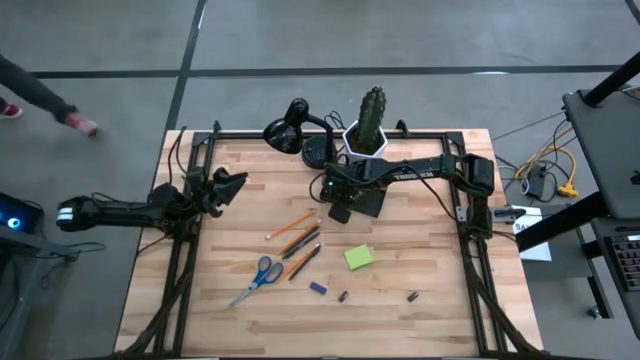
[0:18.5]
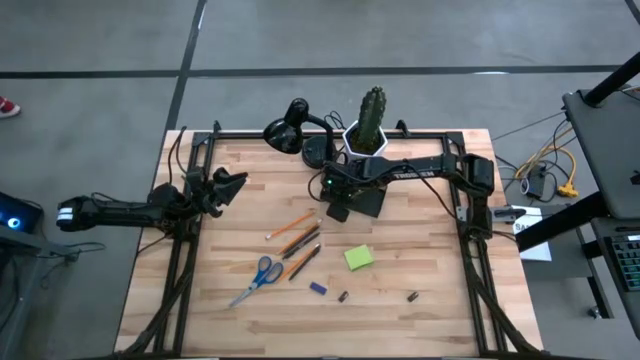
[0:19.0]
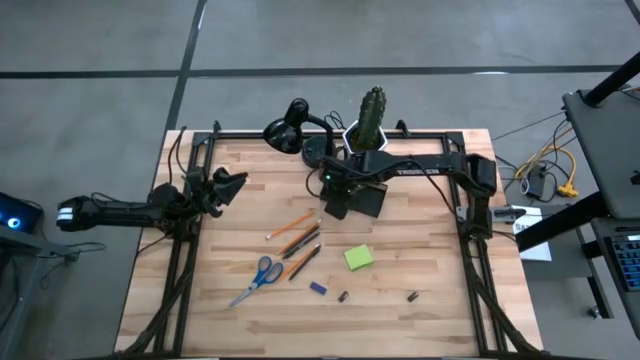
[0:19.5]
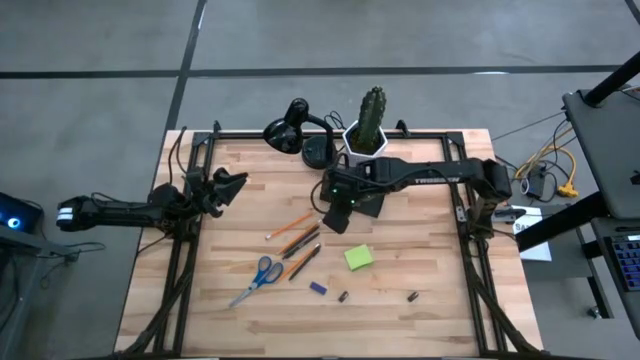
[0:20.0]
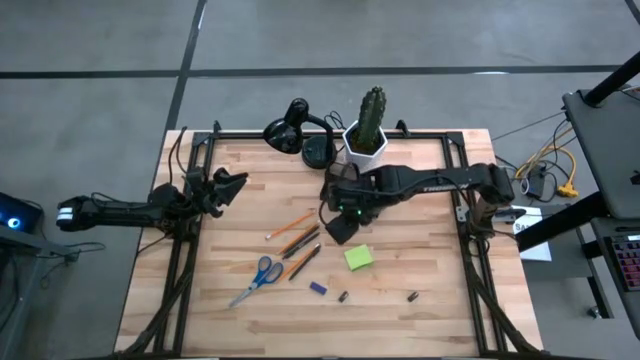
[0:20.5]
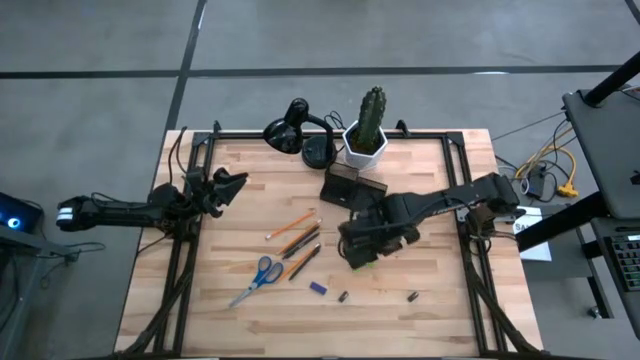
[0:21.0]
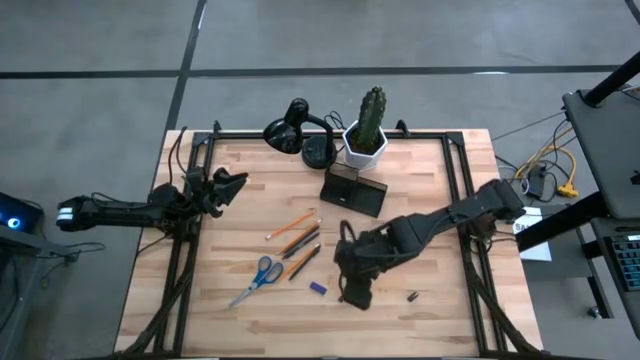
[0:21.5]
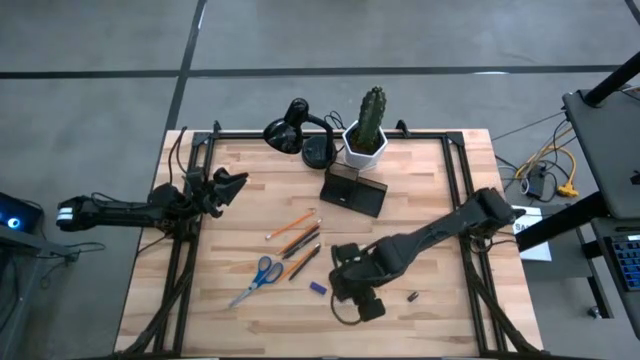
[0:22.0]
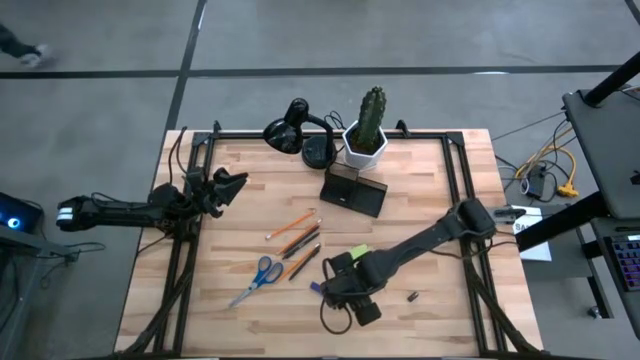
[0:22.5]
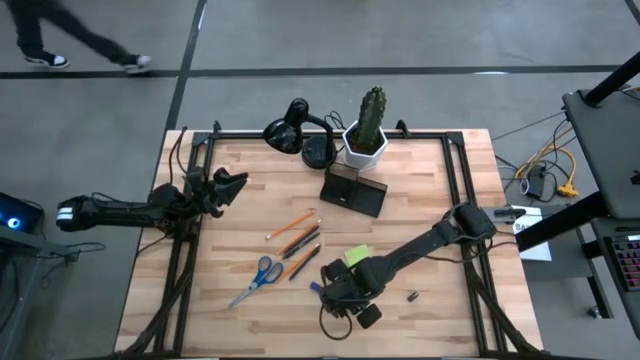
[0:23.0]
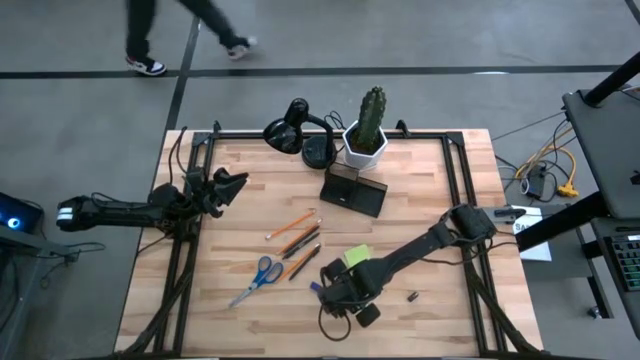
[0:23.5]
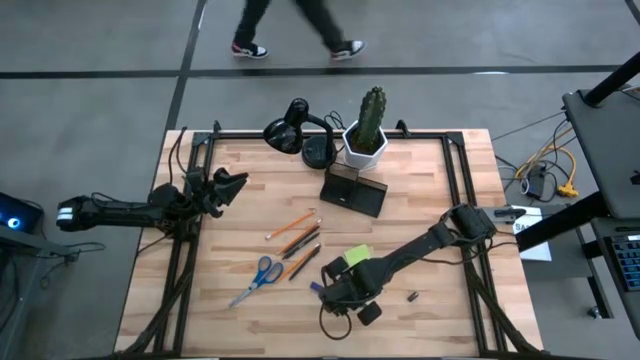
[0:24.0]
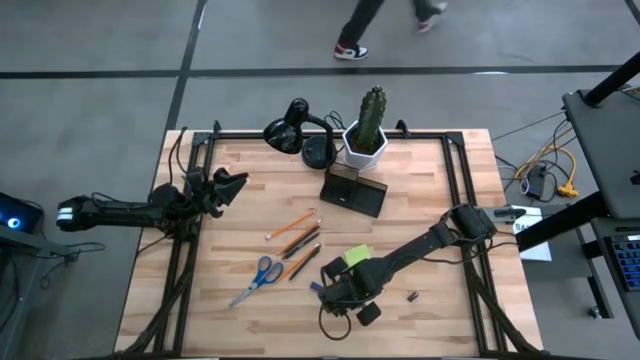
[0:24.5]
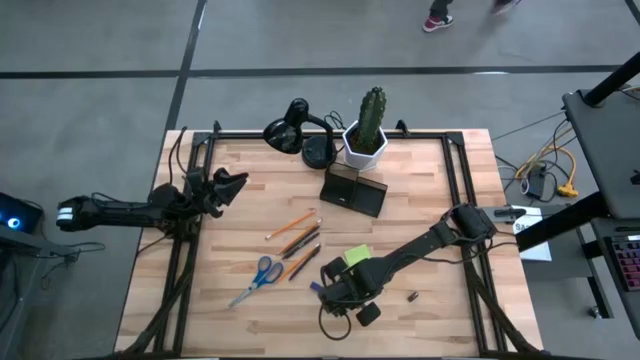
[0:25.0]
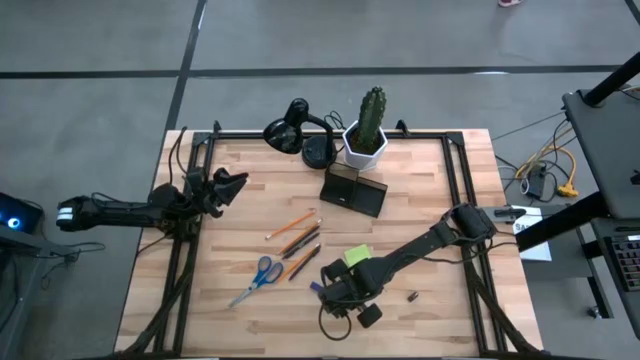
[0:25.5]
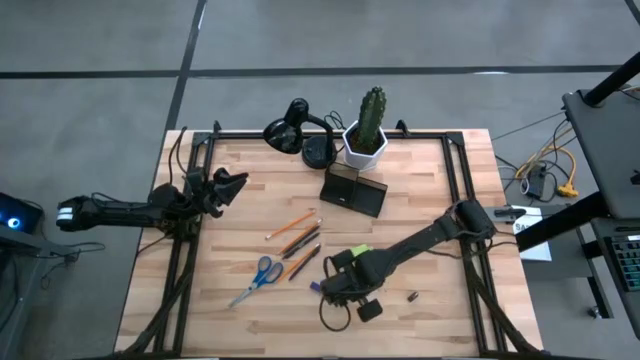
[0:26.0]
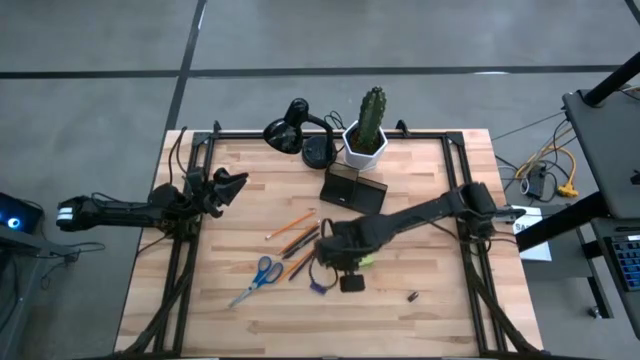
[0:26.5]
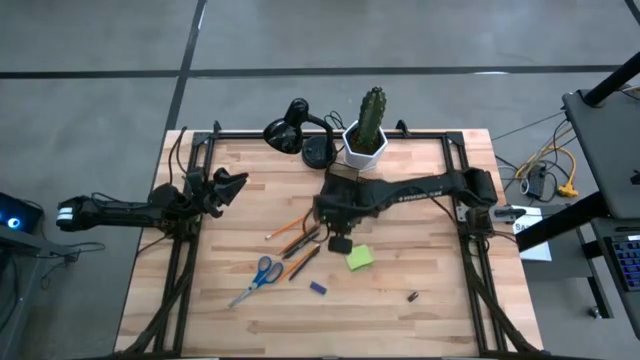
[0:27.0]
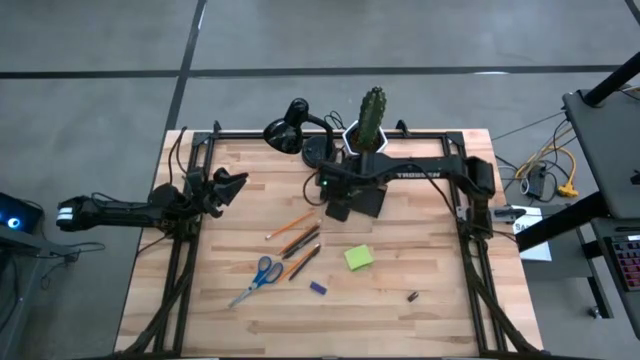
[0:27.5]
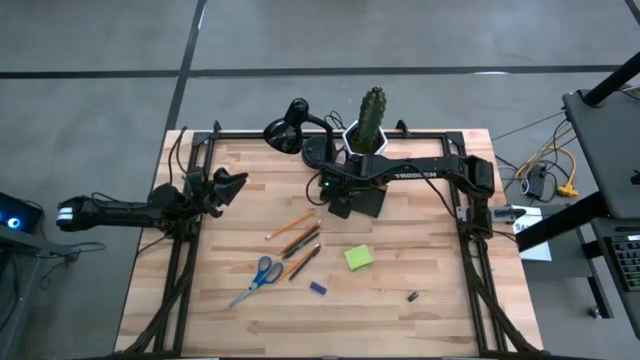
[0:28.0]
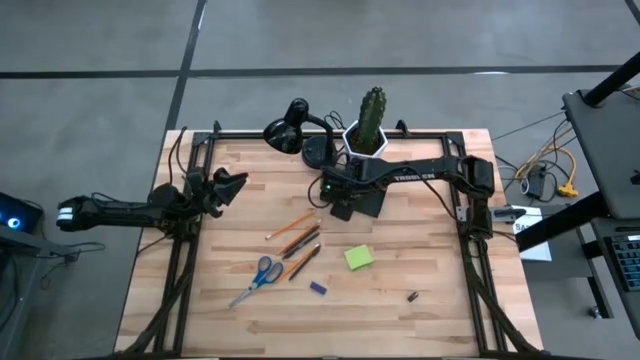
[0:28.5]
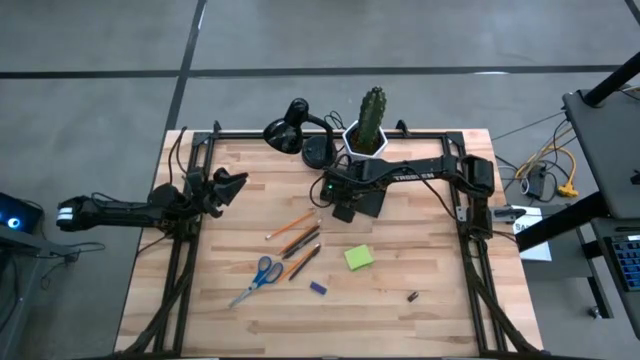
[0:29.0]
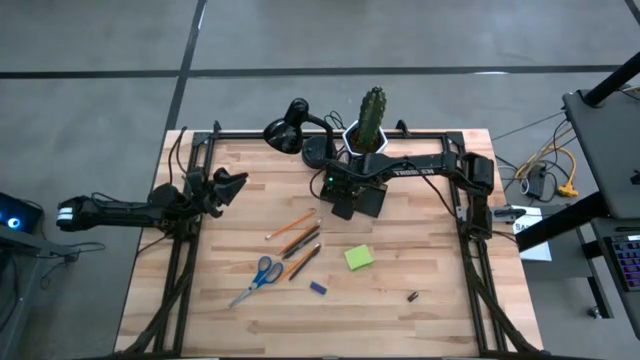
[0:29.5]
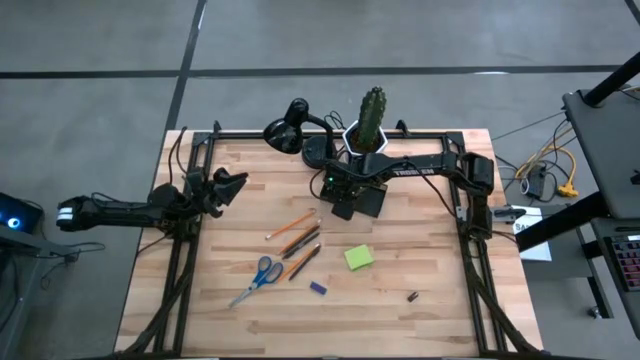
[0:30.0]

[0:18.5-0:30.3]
Task: Pick and place office supplies into organizer
Put the left black binder clip into the black desk organizer

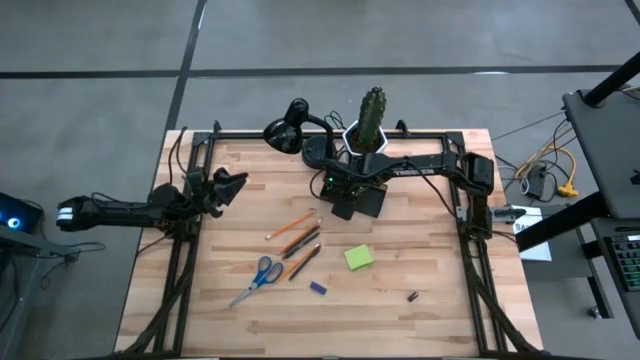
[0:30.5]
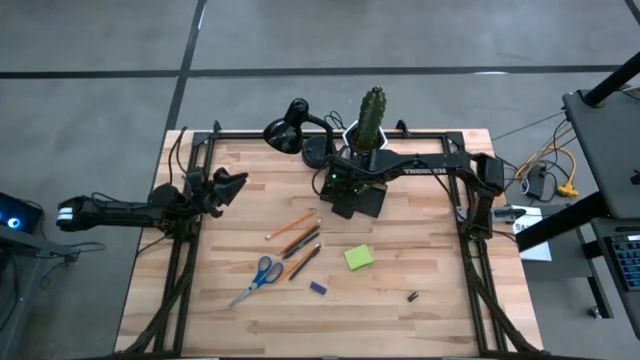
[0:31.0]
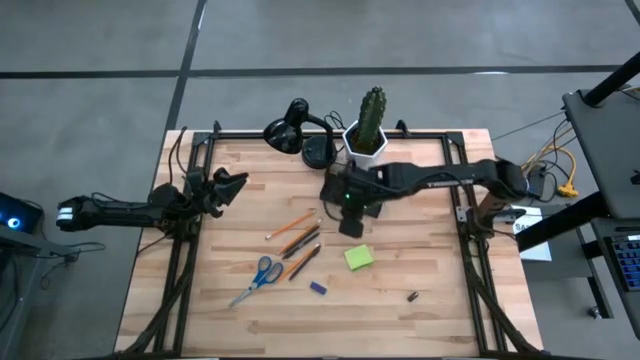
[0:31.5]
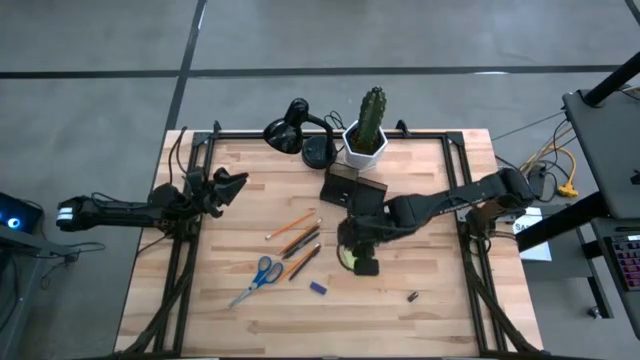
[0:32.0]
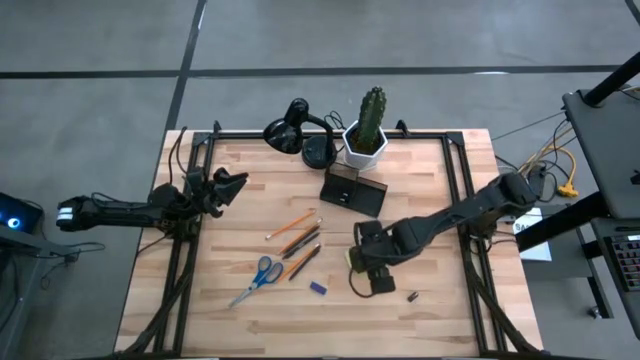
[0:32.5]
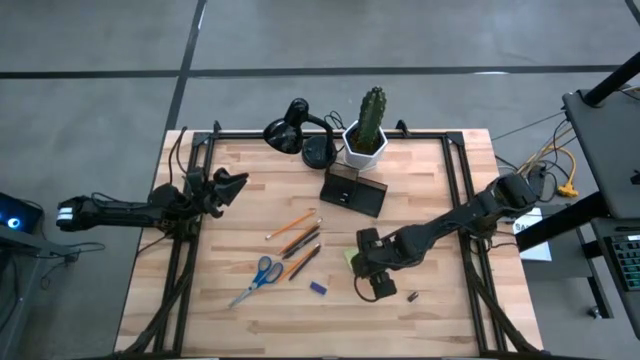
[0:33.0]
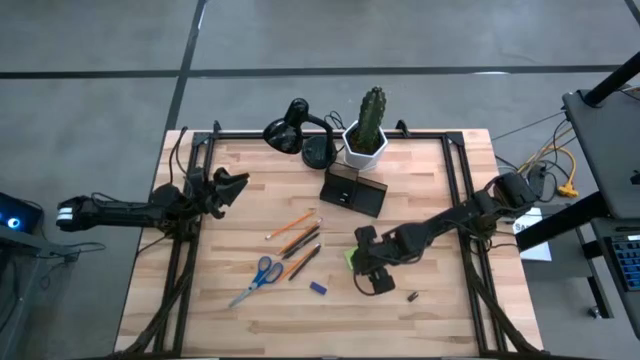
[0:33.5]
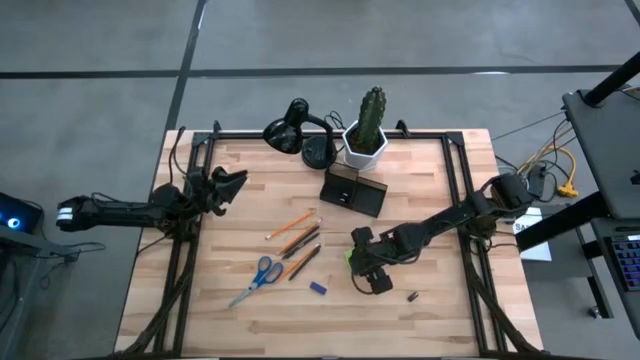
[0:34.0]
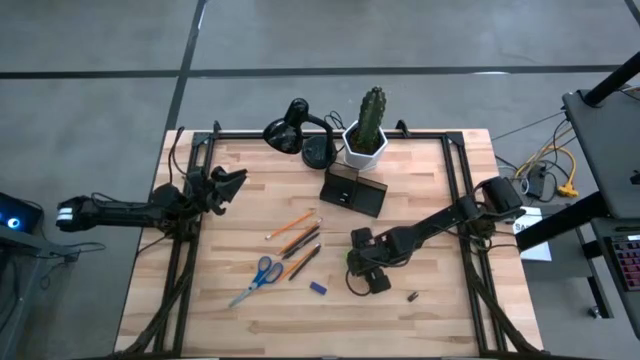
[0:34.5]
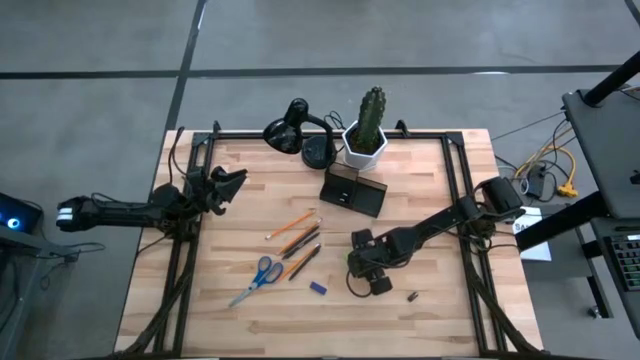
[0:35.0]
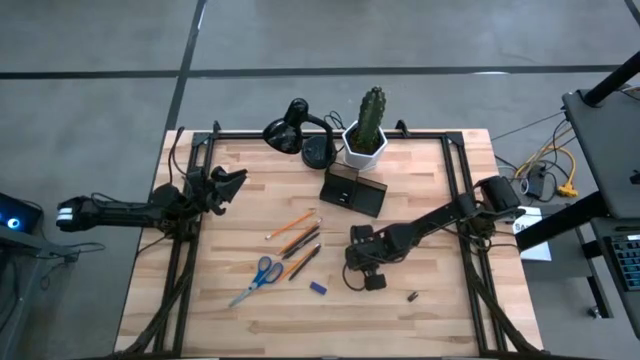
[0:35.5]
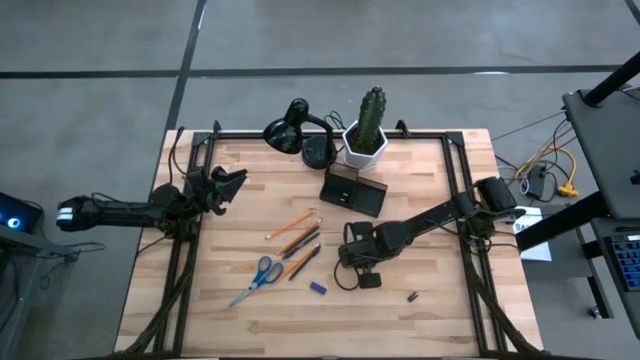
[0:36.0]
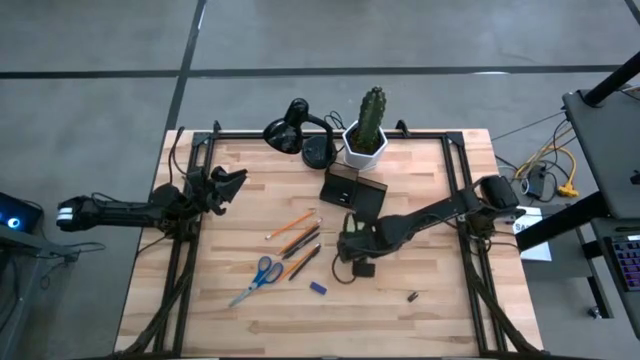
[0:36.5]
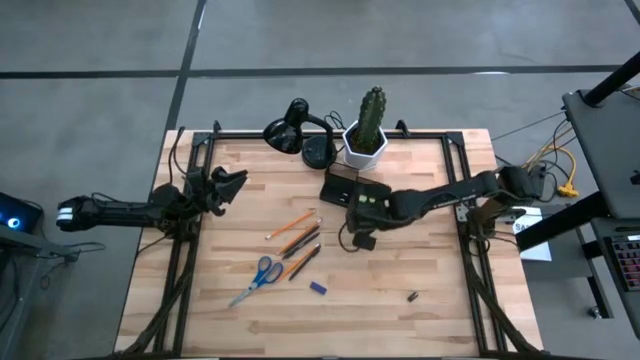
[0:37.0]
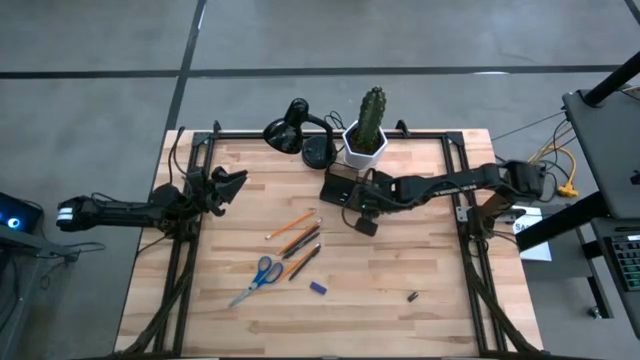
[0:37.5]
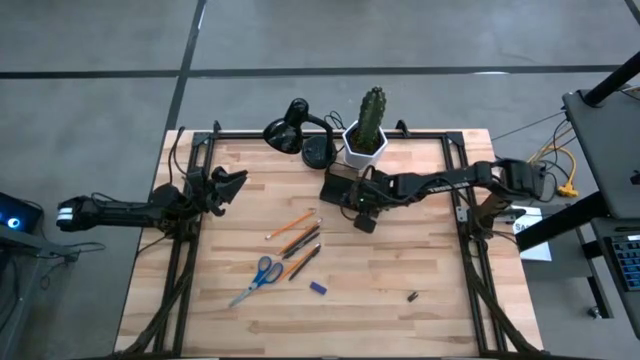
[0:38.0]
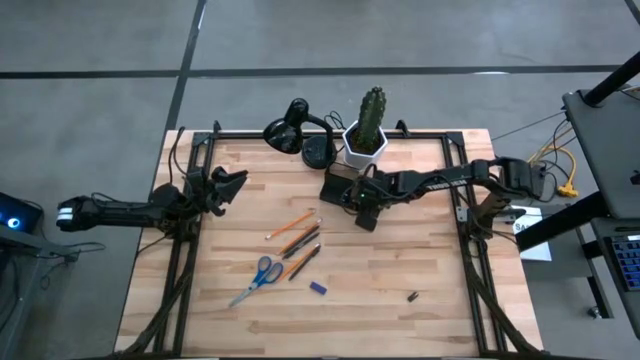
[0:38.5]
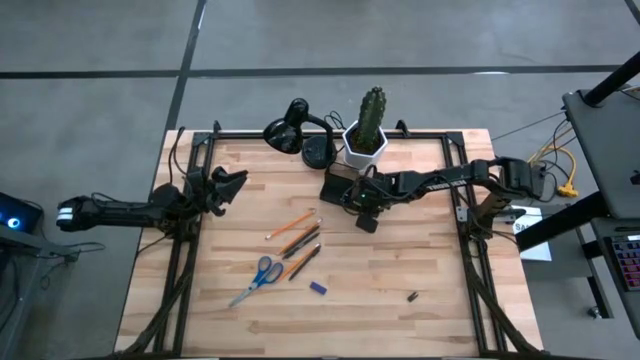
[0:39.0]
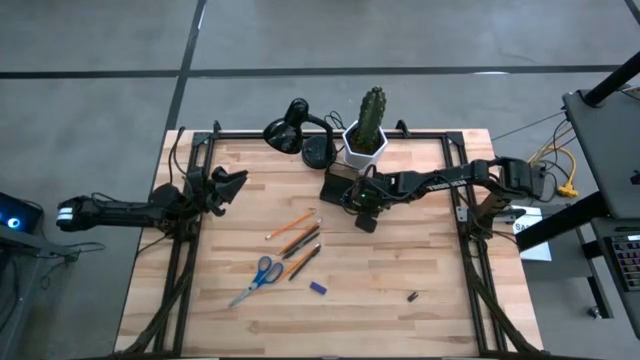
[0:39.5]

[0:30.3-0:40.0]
Put the green sticky notes into the black desk organizer
